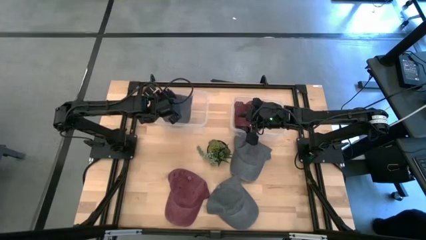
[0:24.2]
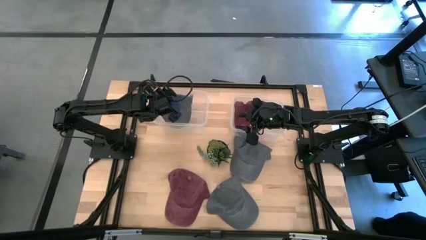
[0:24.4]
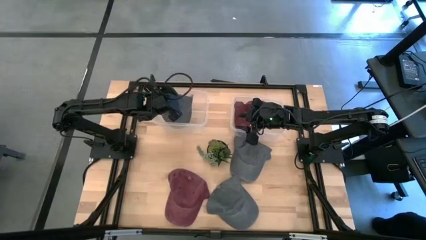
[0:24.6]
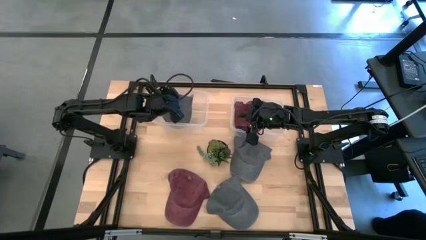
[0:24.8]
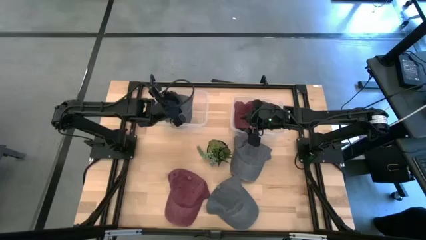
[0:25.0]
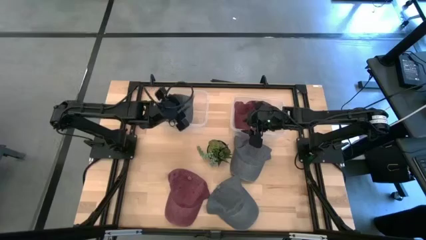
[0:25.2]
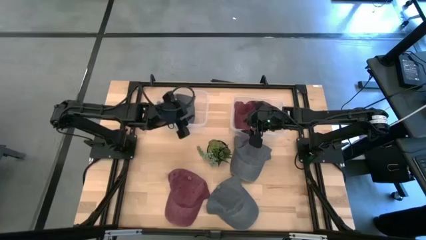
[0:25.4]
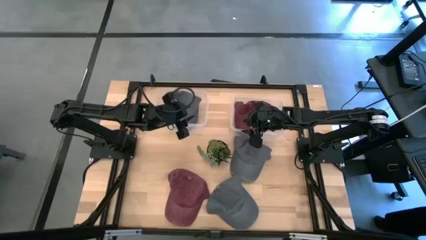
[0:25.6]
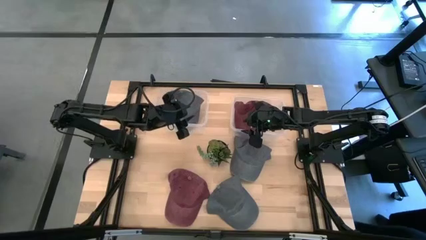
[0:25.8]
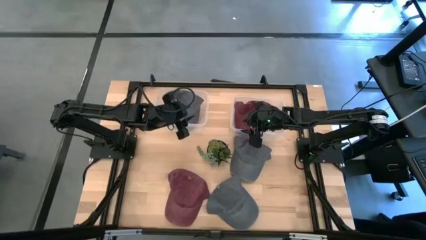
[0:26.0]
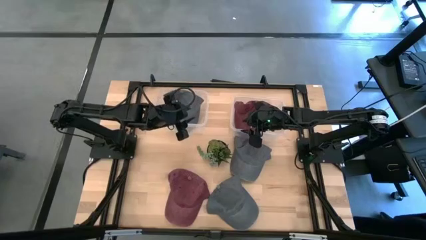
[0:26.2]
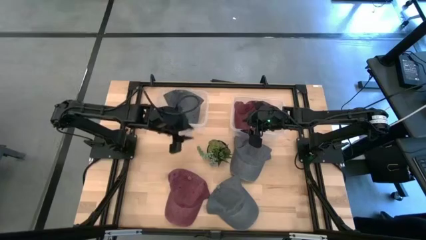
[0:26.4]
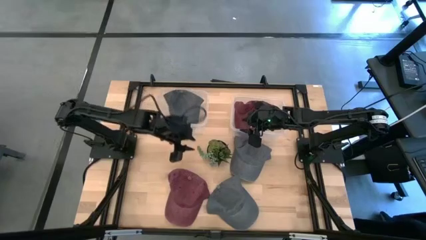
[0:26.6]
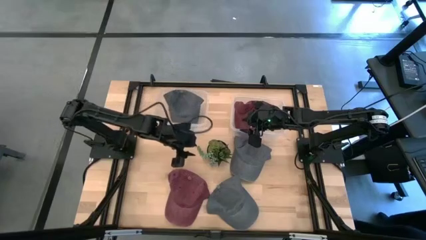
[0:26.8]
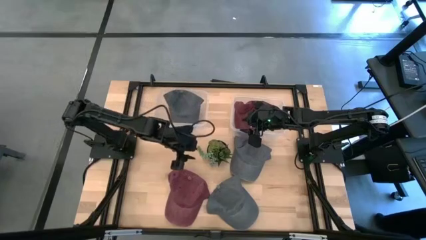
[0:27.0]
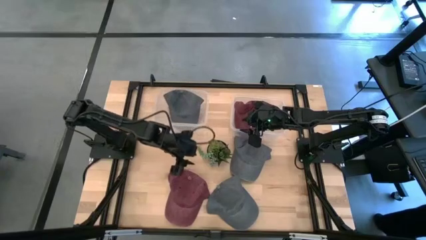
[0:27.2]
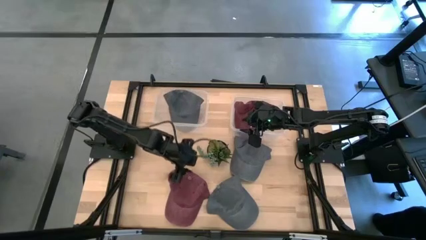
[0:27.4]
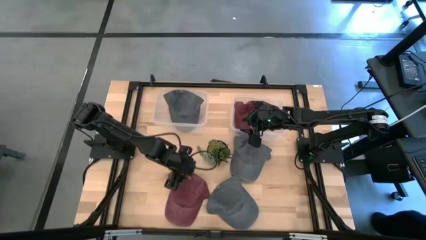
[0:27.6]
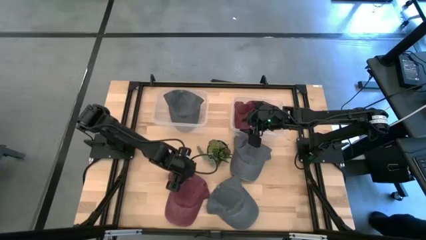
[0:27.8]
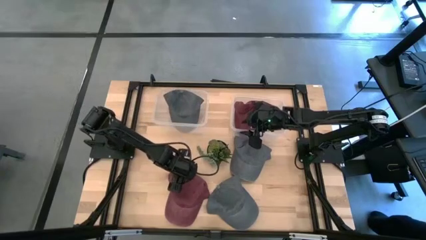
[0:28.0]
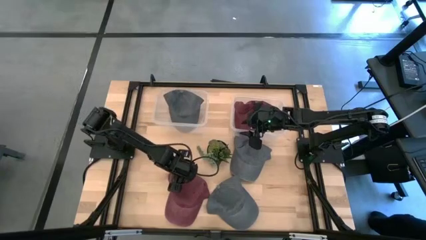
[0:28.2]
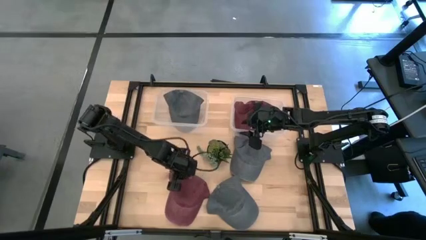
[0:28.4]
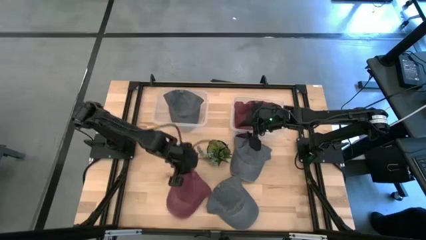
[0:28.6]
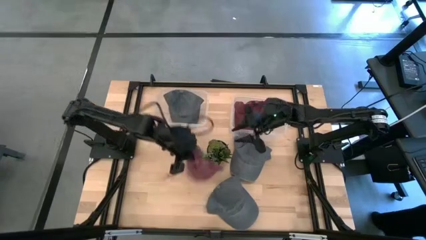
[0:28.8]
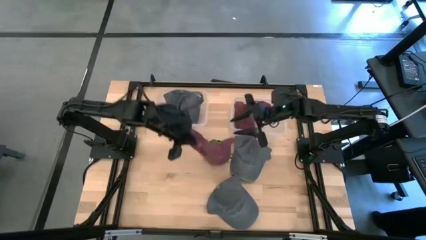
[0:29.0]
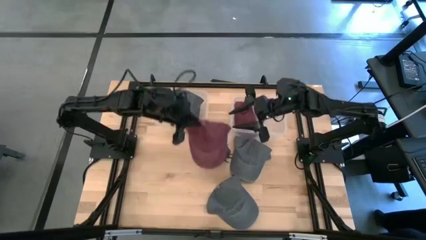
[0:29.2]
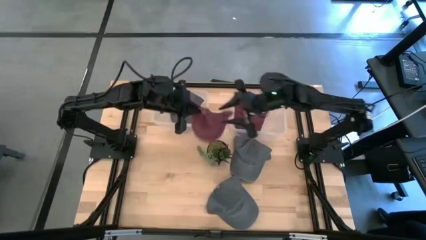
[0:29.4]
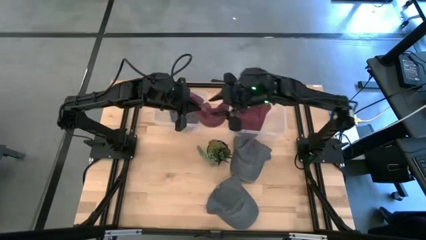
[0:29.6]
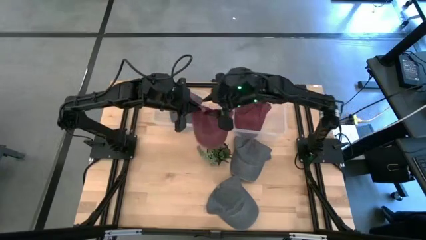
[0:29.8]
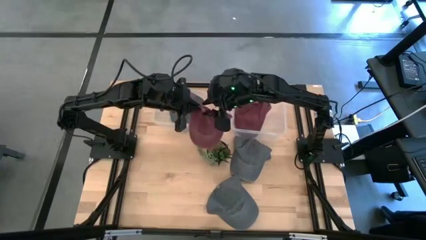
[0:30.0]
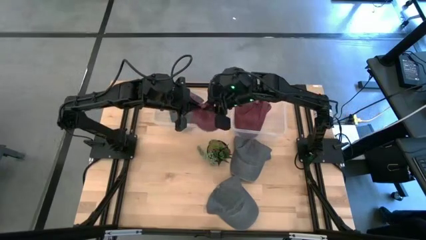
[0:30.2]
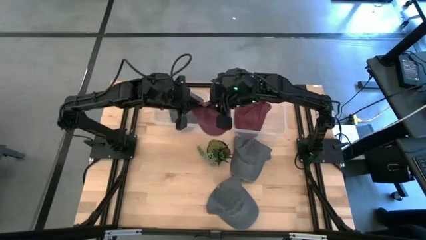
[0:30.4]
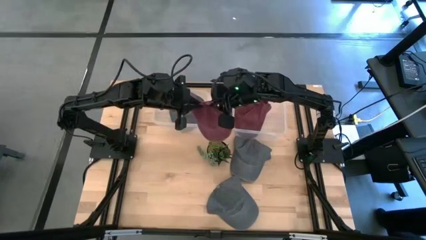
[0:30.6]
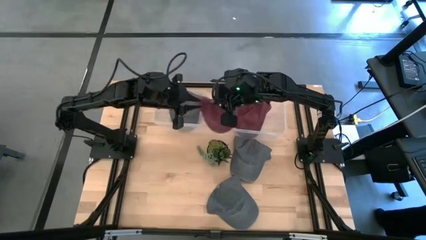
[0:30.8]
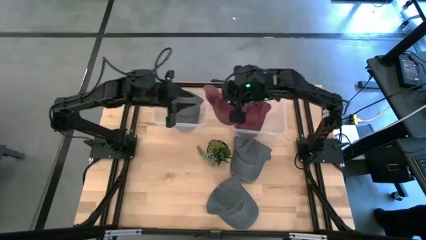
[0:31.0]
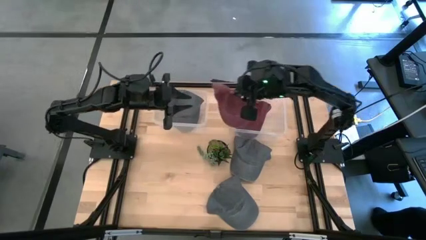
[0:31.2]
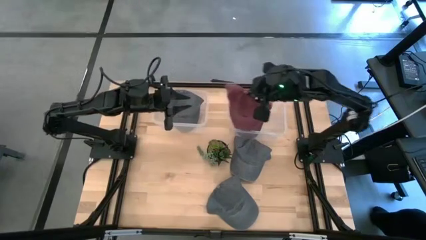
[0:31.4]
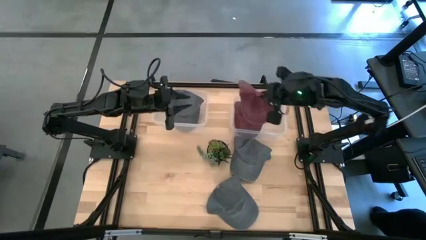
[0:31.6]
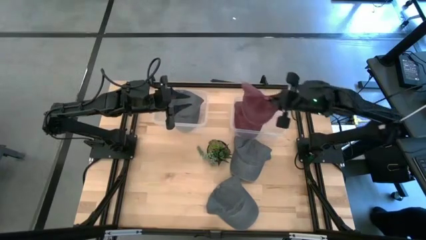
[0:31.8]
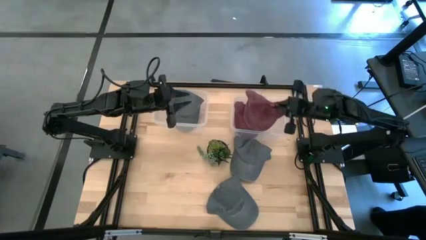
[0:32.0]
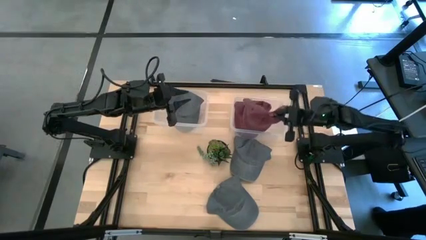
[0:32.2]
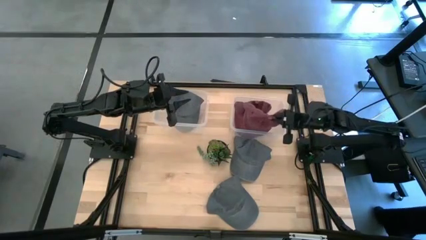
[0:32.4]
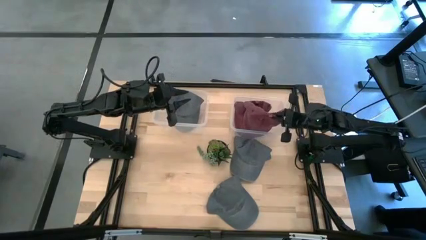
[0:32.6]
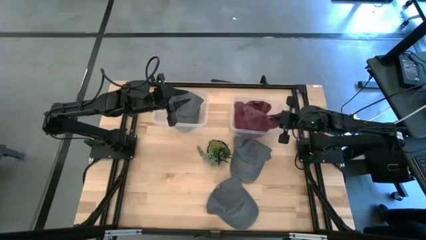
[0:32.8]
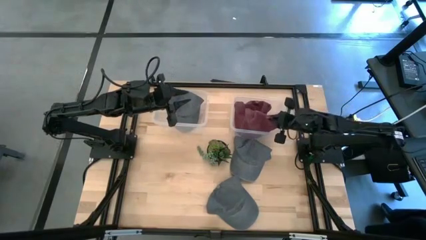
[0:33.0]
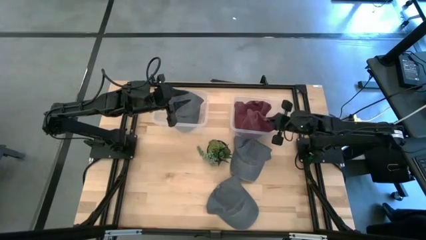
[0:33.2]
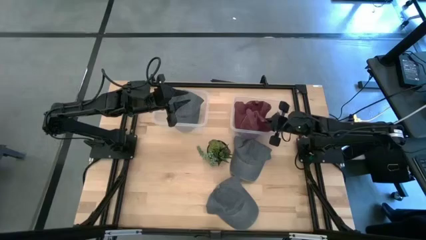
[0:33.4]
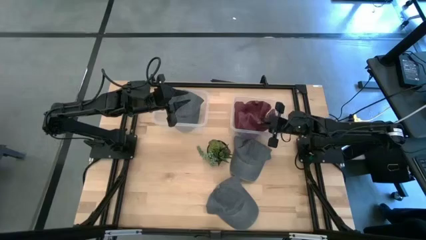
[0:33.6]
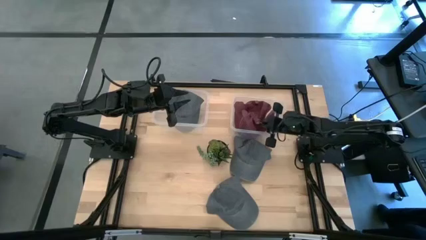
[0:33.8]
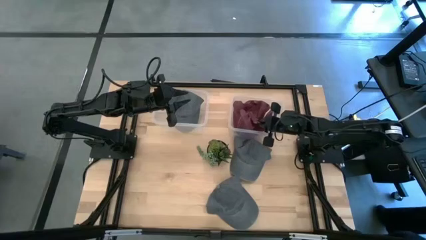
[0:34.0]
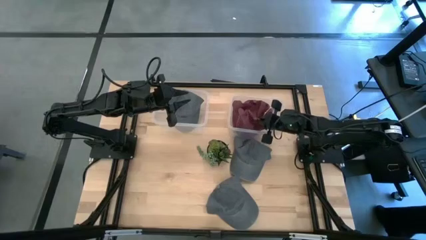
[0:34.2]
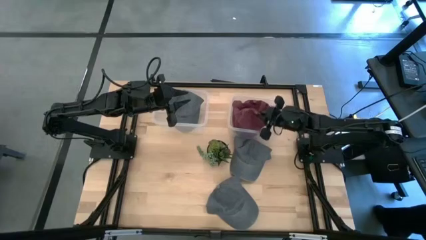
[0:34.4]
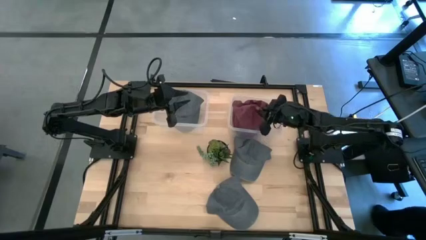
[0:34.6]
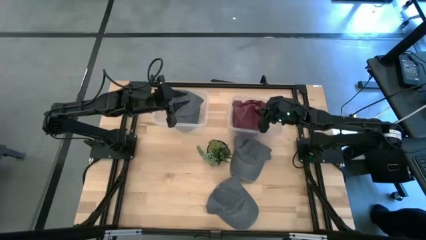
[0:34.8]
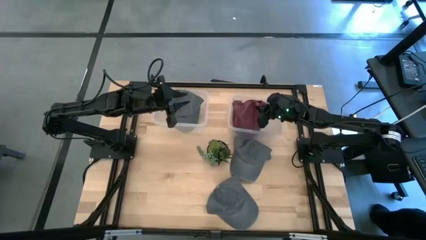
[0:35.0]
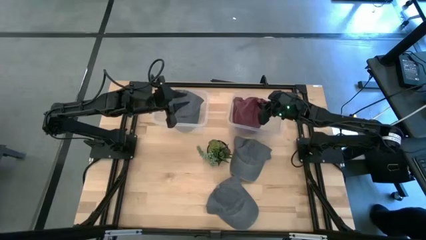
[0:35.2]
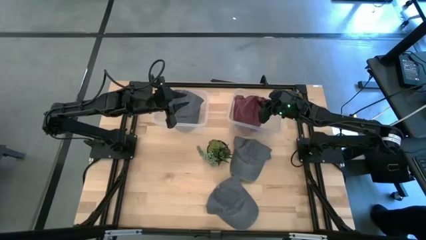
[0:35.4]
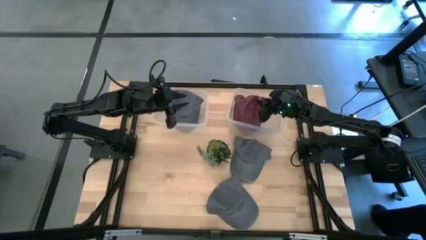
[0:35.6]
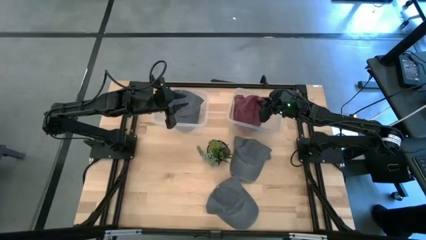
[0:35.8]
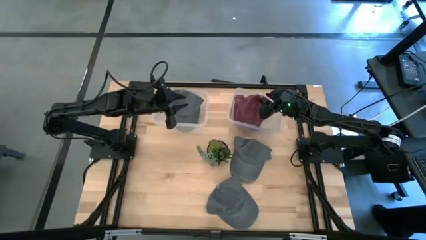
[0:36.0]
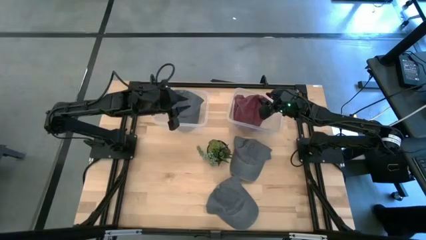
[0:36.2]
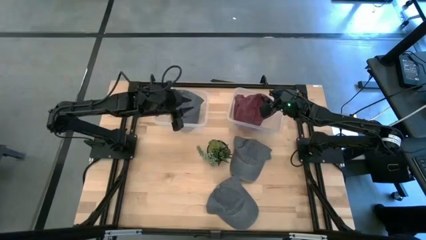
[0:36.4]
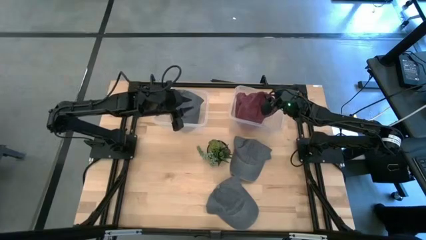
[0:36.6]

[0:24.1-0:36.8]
Task: Pick & Place hat
Put the red cap into the right transparent bin
